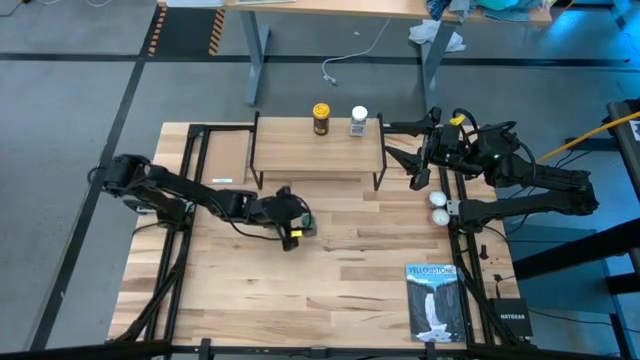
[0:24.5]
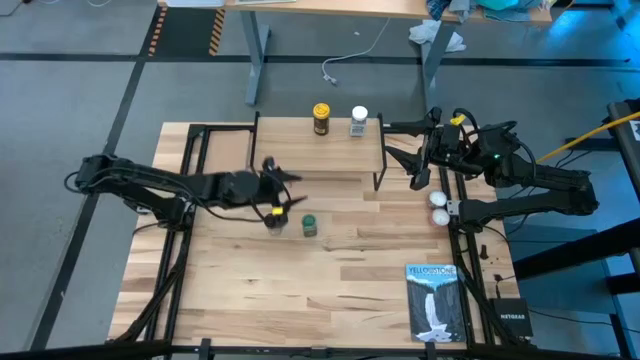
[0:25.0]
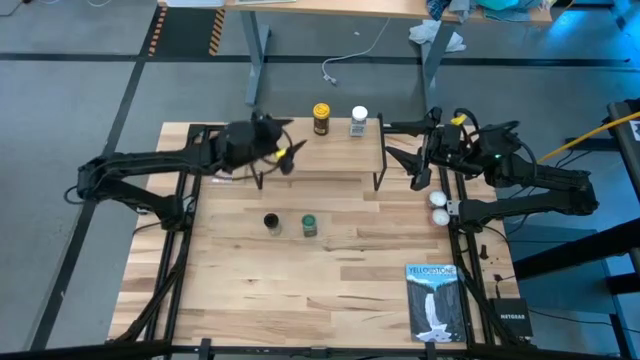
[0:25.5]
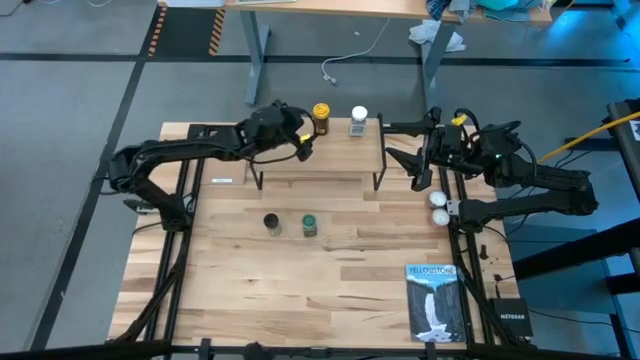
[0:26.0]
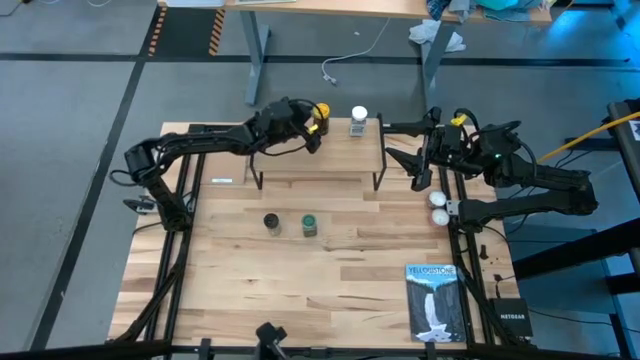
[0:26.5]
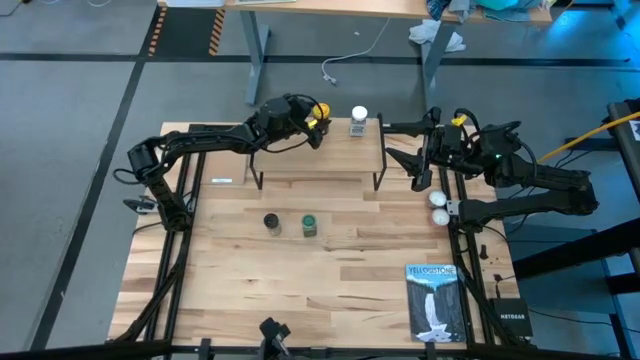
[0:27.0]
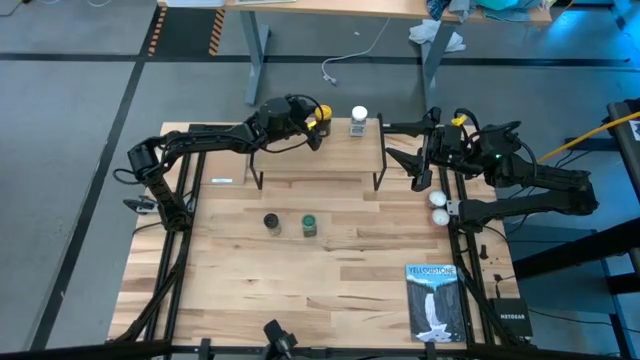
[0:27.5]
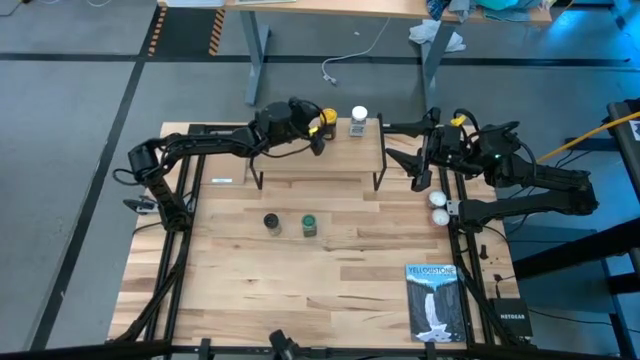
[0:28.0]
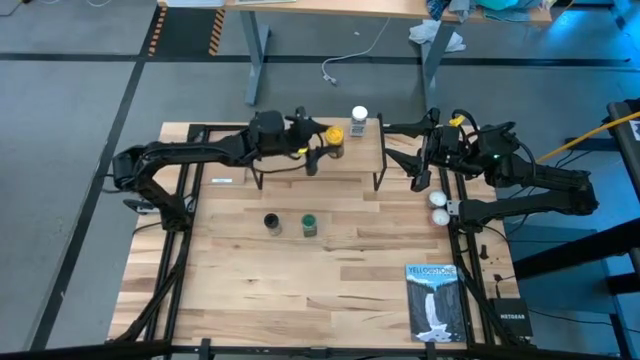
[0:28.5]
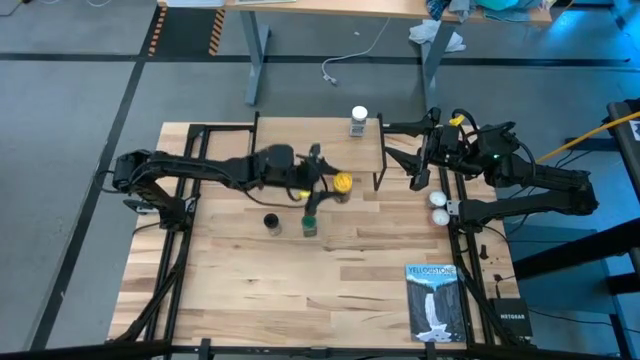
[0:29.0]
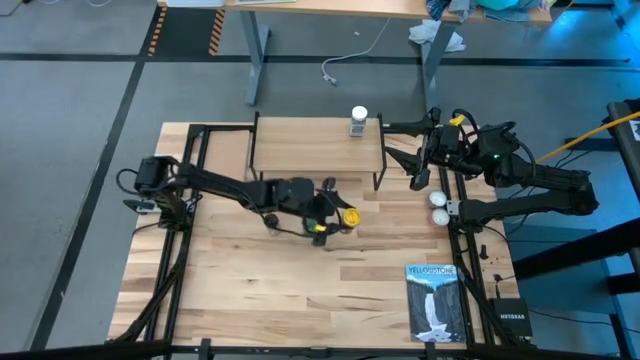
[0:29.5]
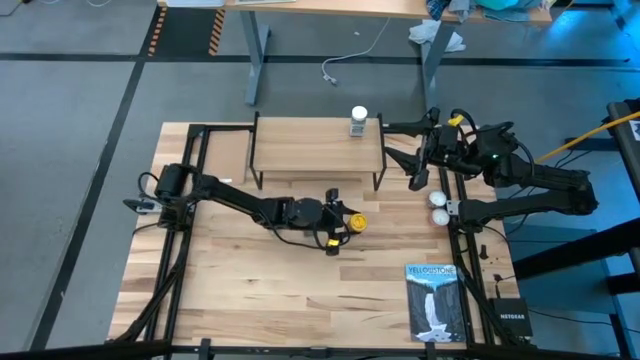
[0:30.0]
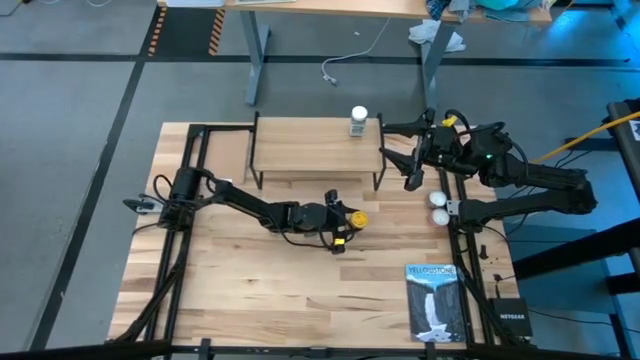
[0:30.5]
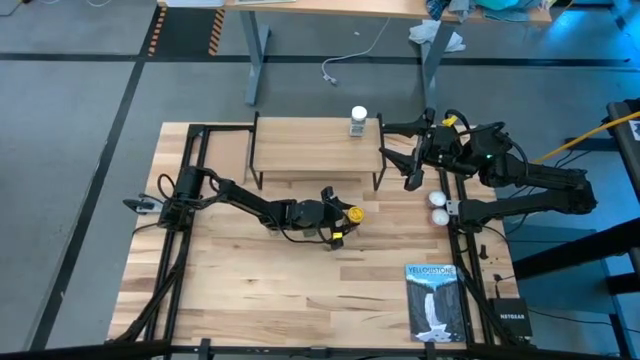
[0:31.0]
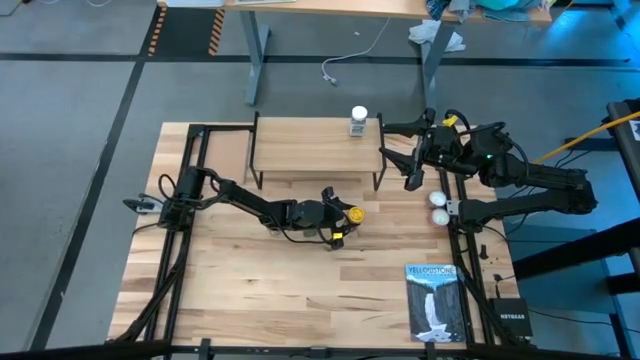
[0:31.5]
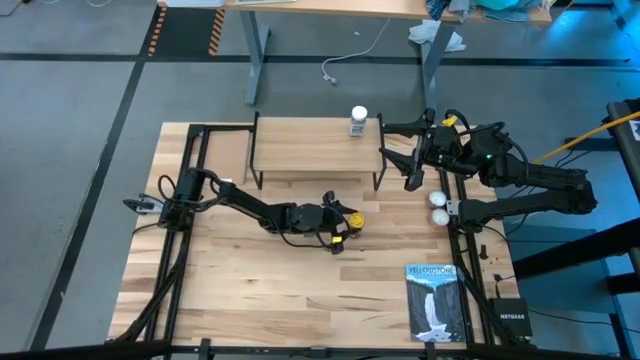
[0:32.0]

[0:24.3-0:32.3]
Task: Shelf spices
Remove the yellow seasoning bottle from the shelf

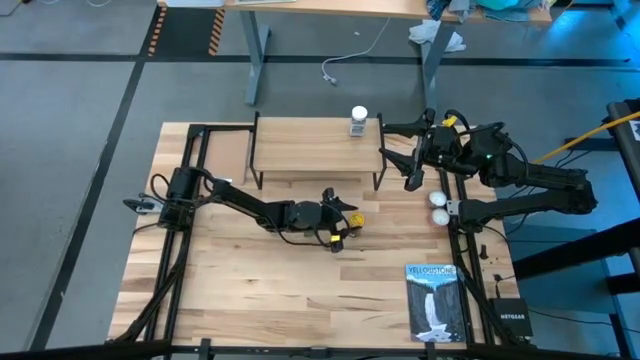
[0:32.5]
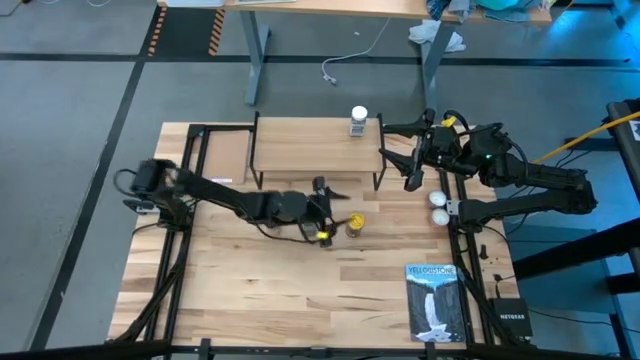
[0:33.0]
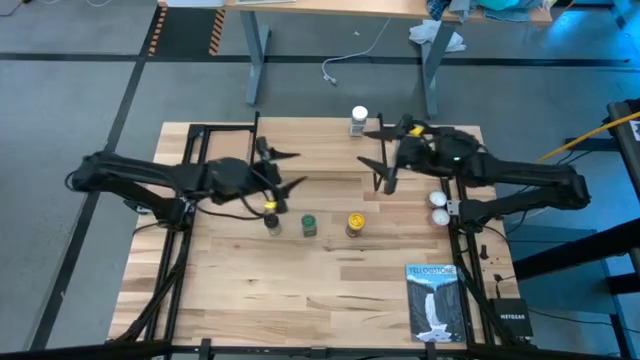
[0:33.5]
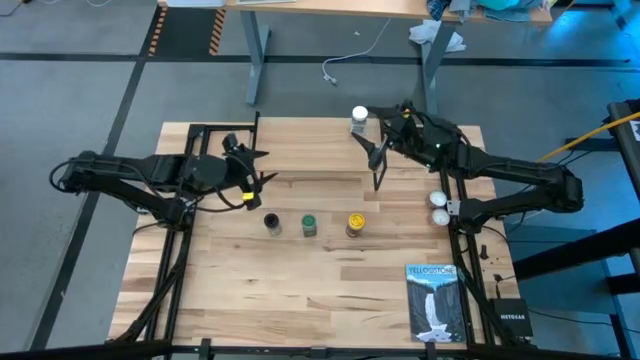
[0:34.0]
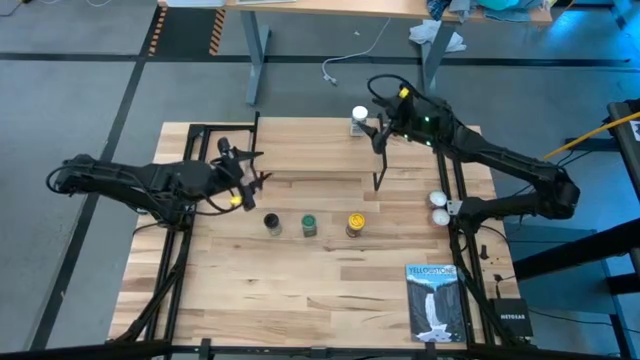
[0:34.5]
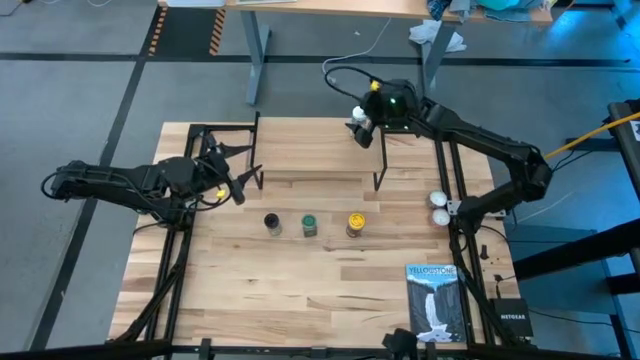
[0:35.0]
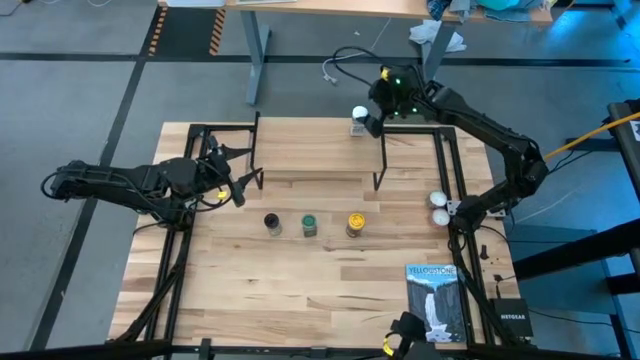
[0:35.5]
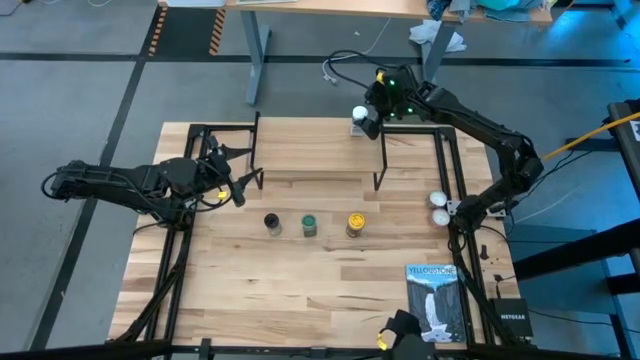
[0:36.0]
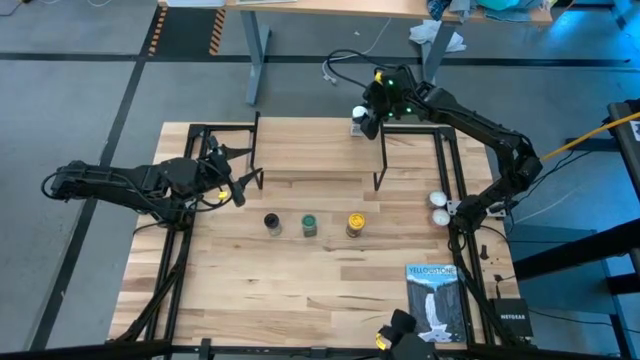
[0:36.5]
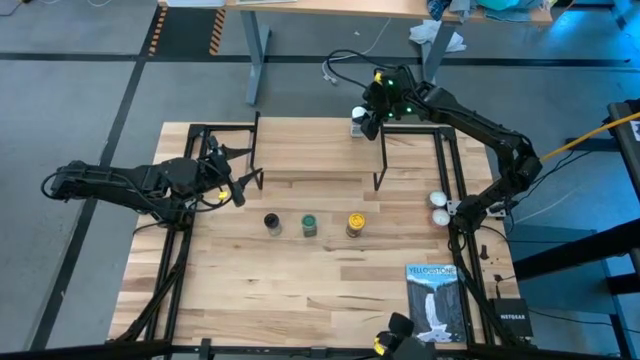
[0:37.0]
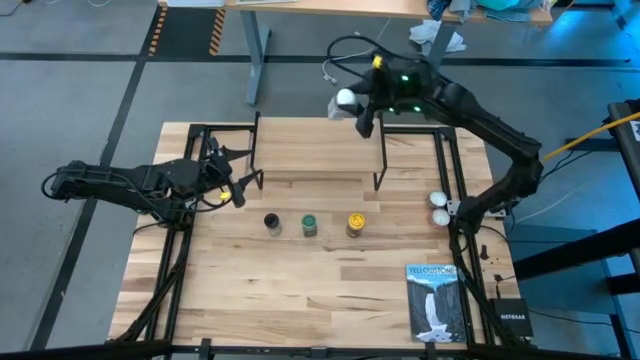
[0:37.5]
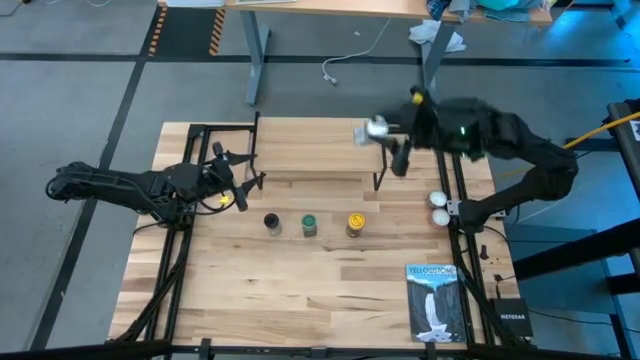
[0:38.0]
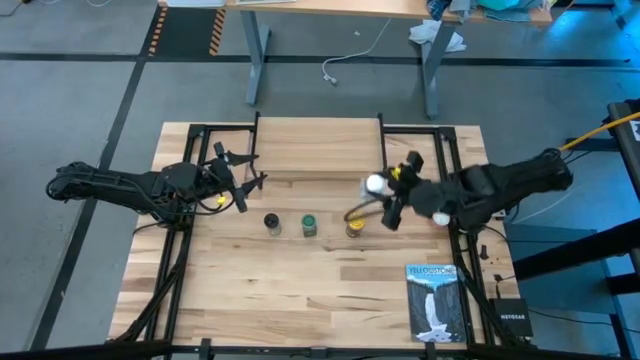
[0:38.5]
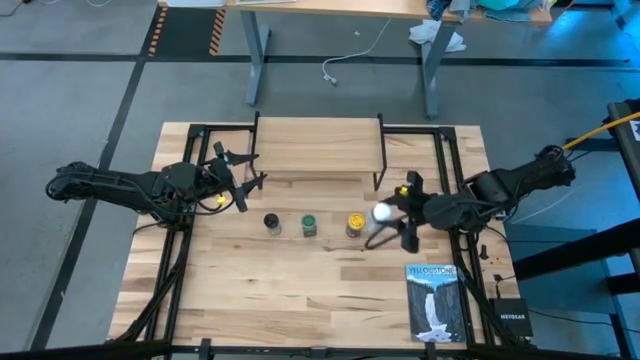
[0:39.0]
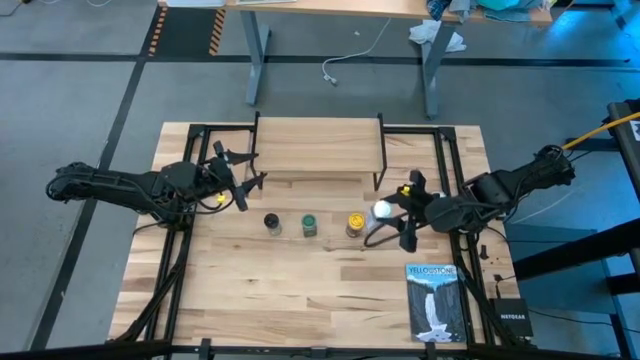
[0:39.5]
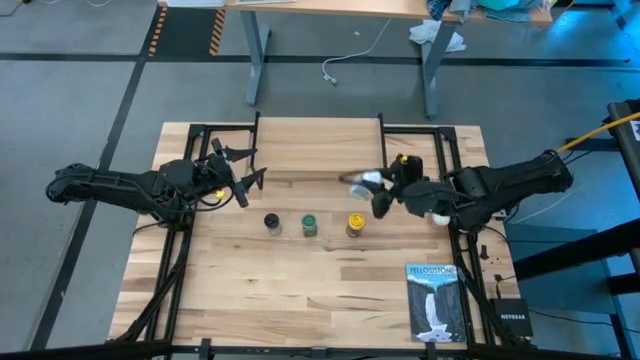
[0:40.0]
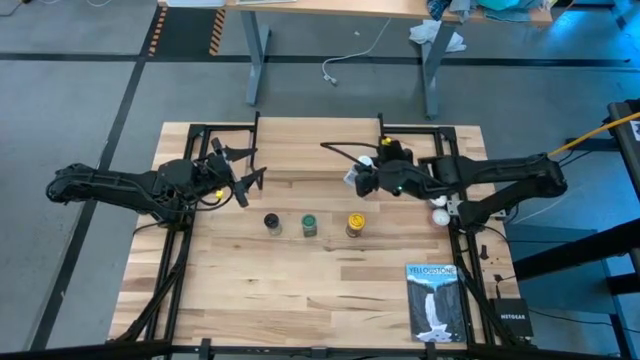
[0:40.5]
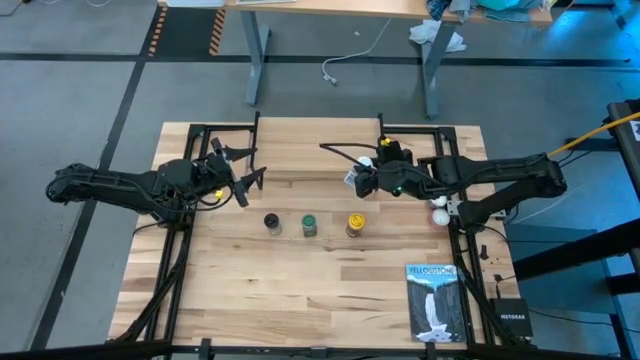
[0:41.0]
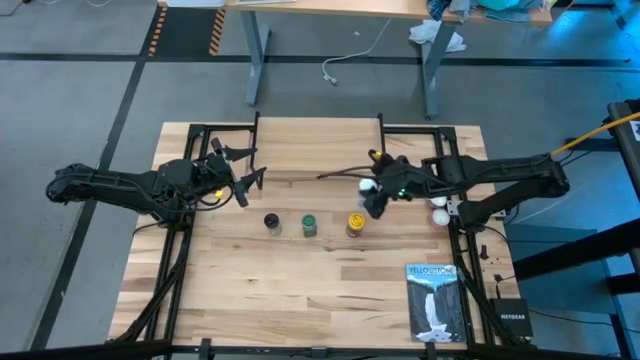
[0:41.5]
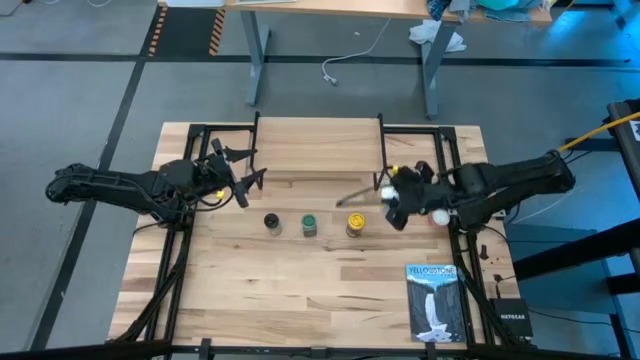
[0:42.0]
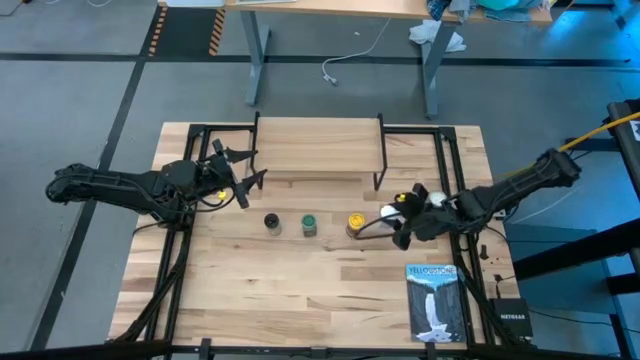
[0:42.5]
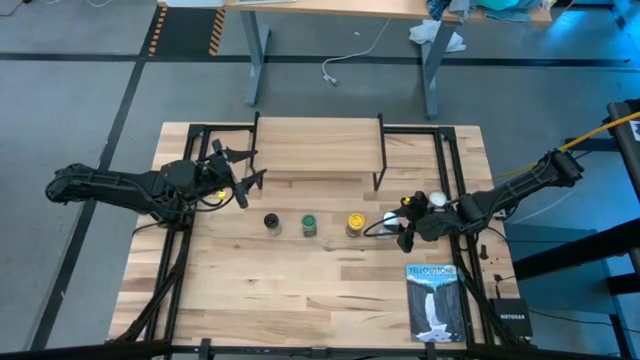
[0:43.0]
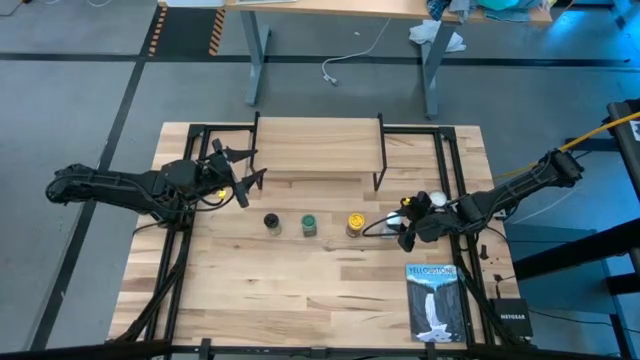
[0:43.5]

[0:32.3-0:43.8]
Remove the white seasoning bottle from the shelf

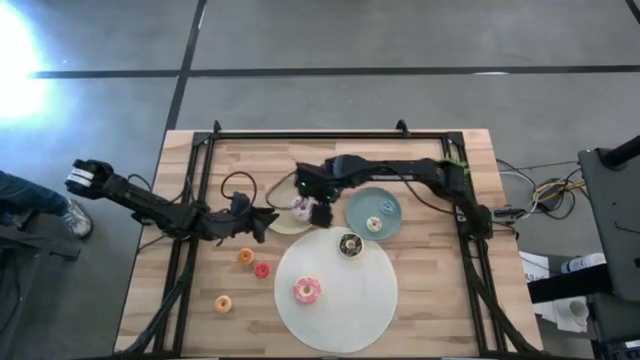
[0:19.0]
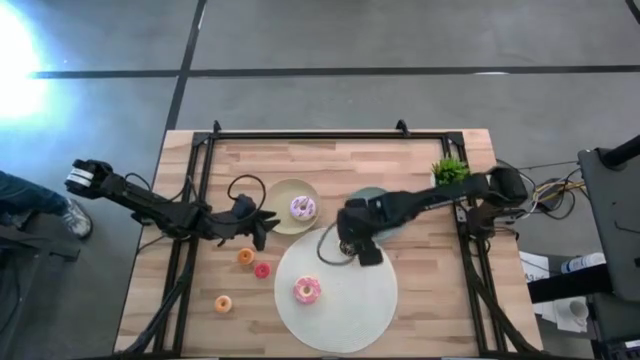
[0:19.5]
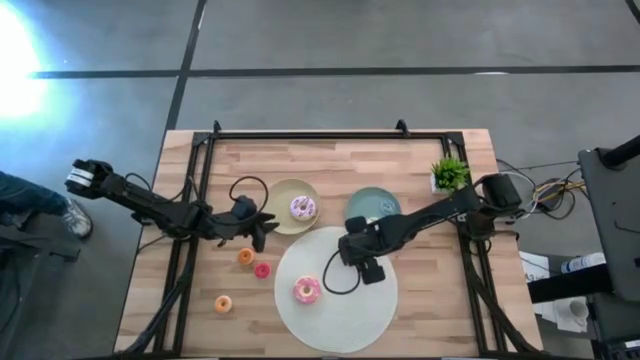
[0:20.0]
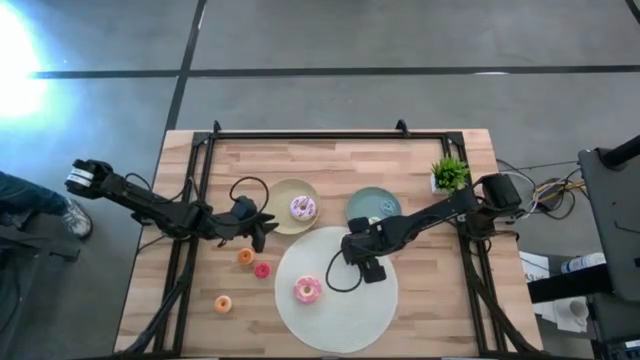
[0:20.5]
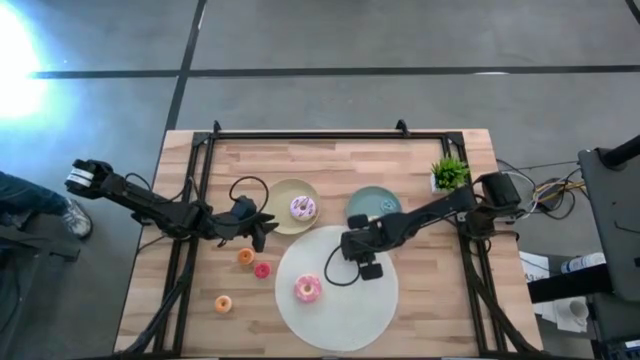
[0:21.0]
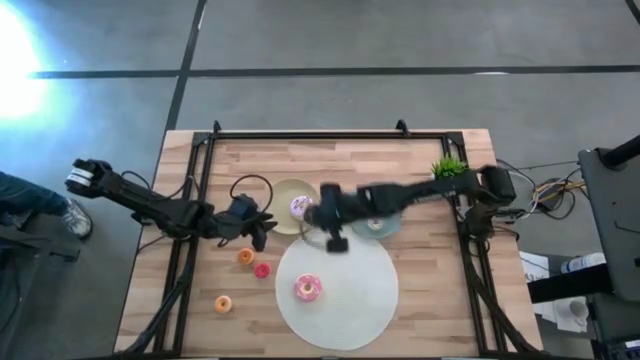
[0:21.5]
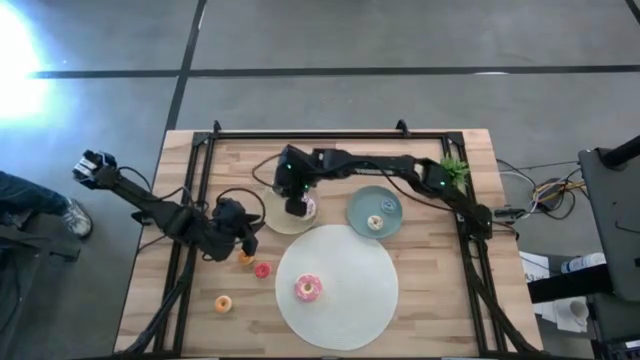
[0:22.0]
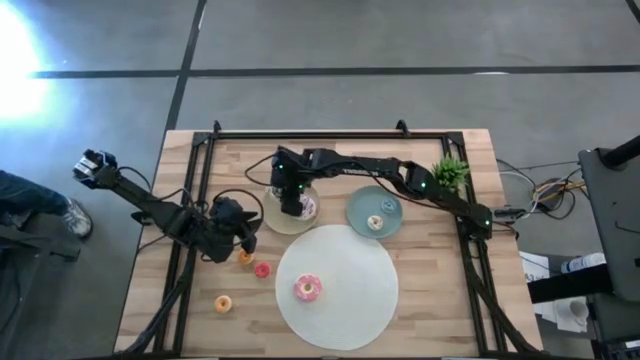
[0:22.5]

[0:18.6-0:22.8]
Task: Pick & Place donuts
Put the large brown donut on the light yellow plate
